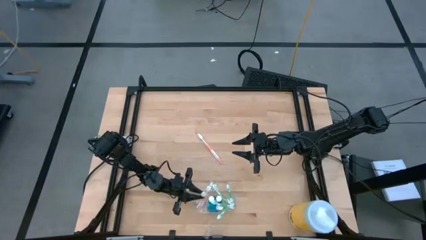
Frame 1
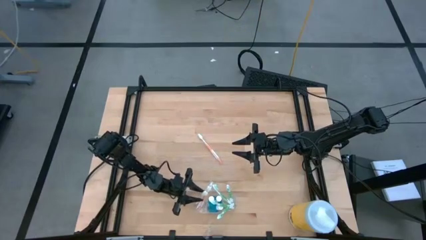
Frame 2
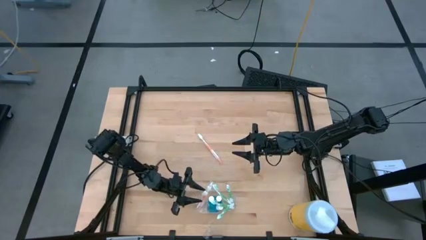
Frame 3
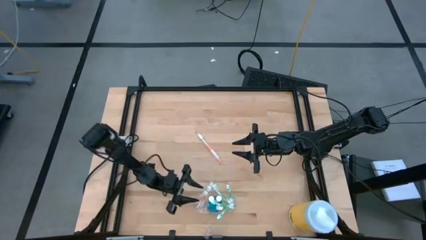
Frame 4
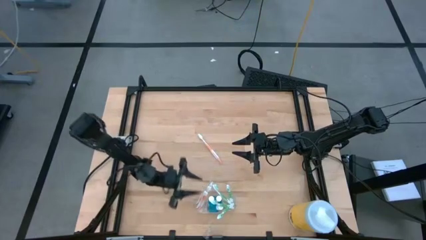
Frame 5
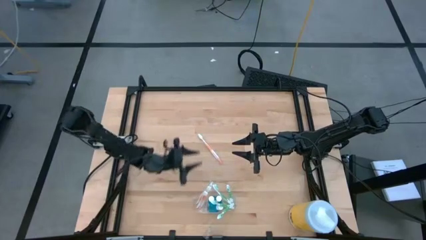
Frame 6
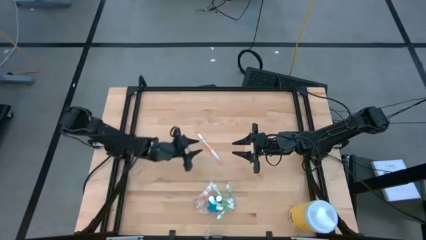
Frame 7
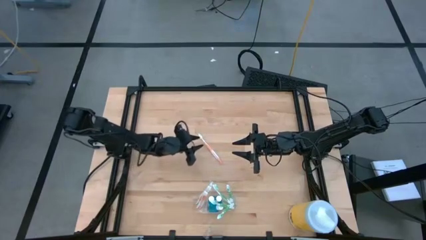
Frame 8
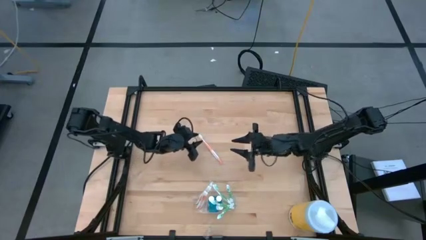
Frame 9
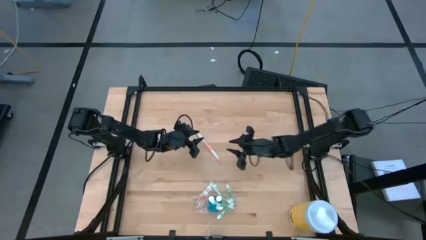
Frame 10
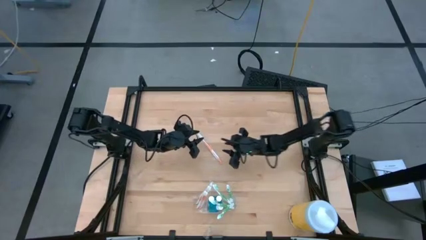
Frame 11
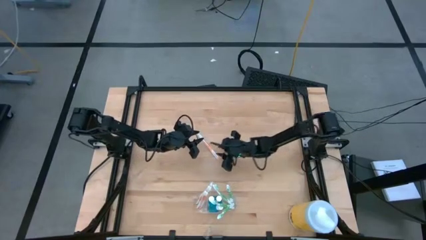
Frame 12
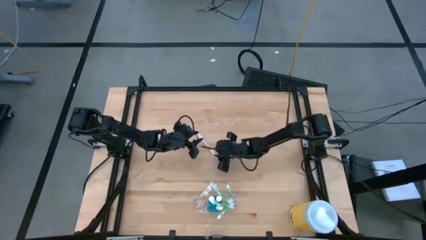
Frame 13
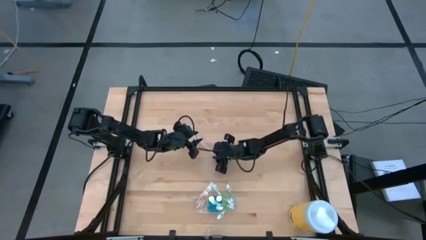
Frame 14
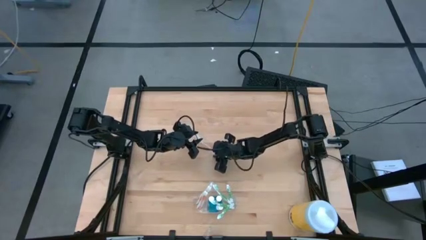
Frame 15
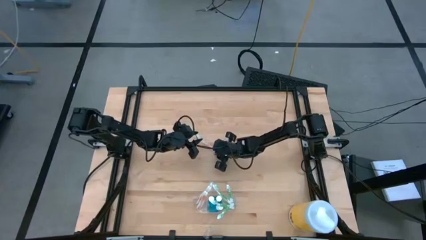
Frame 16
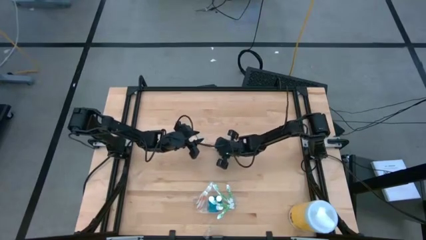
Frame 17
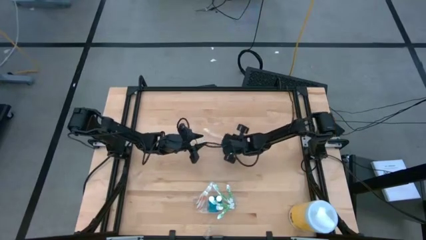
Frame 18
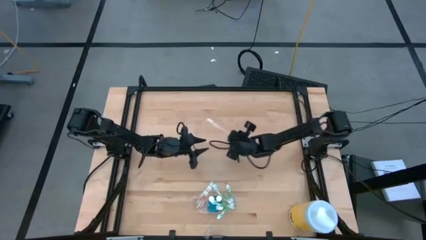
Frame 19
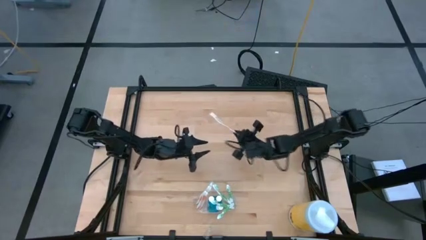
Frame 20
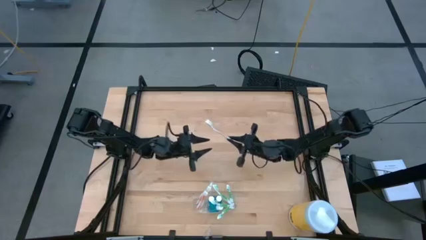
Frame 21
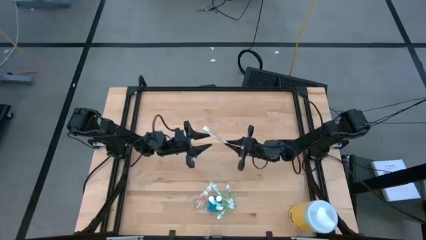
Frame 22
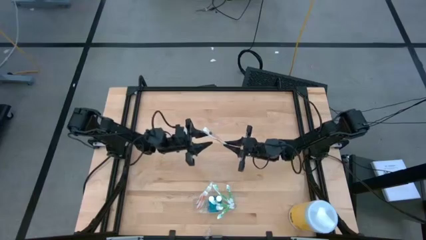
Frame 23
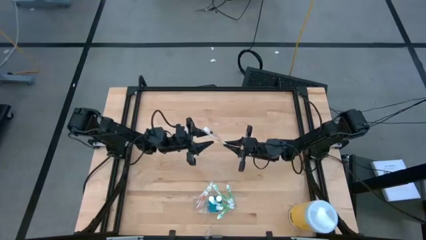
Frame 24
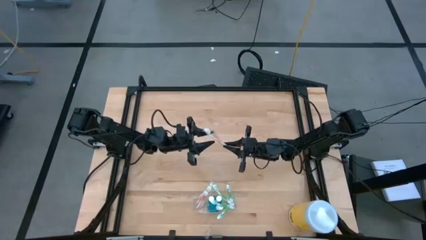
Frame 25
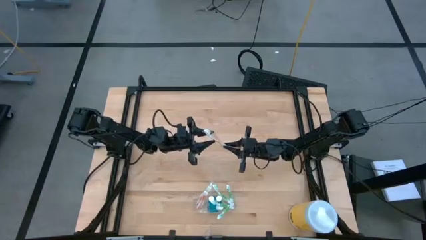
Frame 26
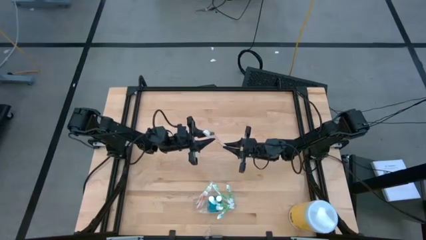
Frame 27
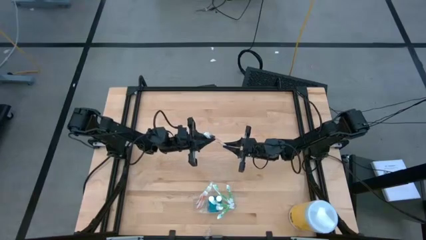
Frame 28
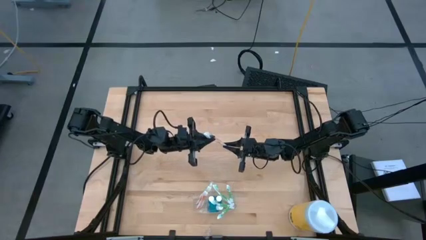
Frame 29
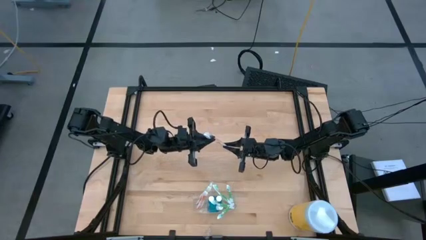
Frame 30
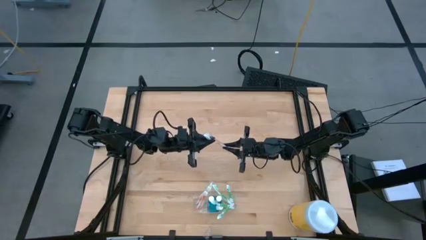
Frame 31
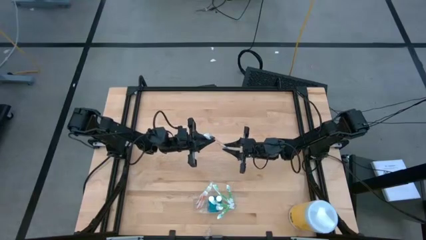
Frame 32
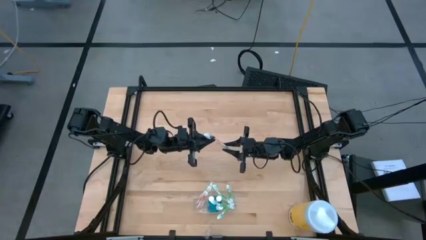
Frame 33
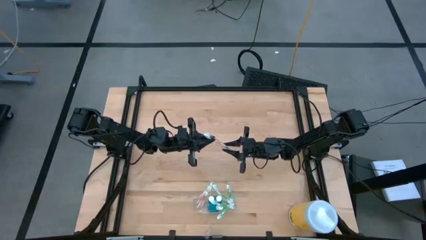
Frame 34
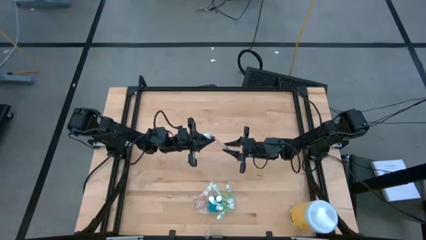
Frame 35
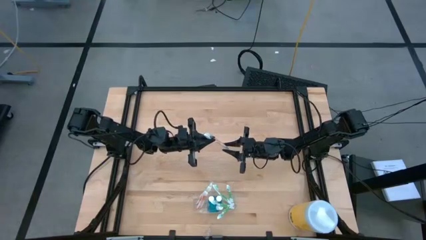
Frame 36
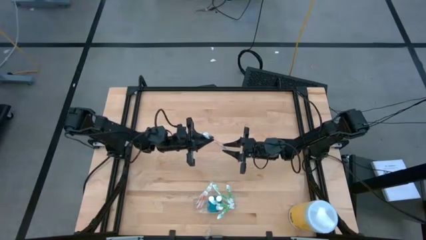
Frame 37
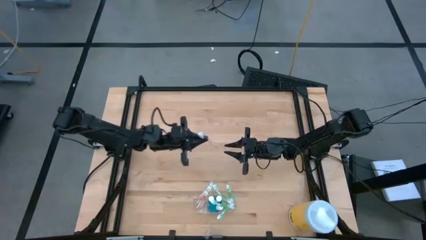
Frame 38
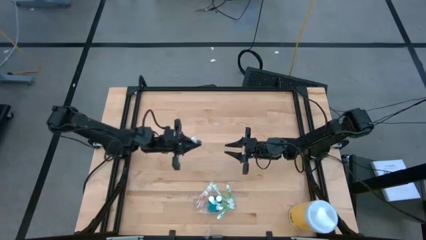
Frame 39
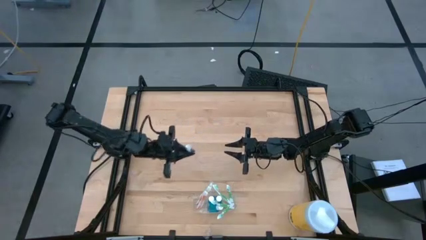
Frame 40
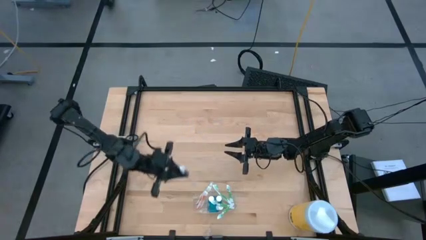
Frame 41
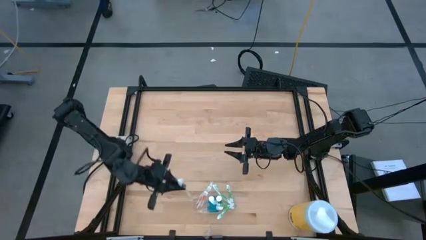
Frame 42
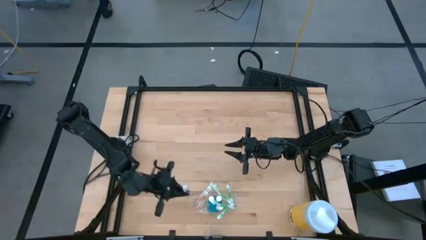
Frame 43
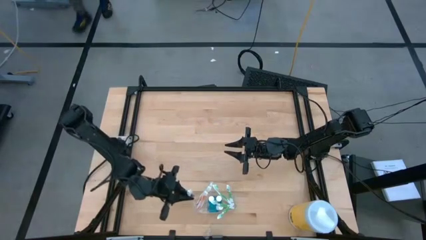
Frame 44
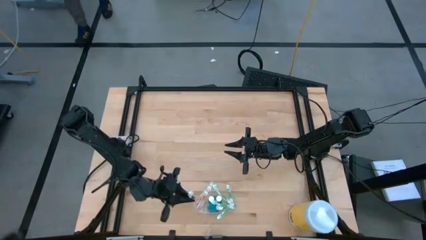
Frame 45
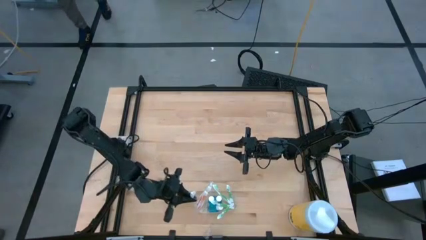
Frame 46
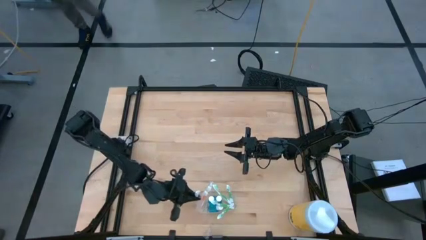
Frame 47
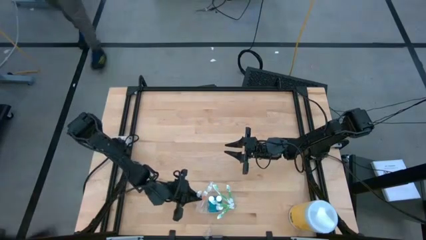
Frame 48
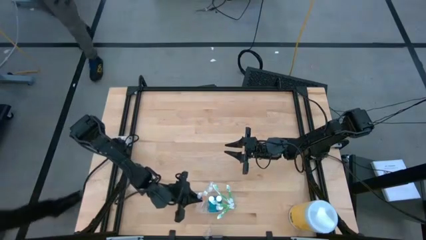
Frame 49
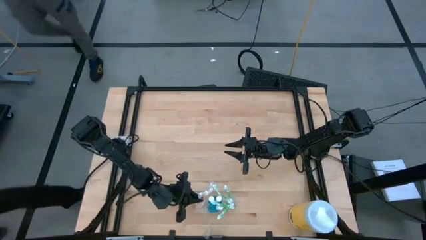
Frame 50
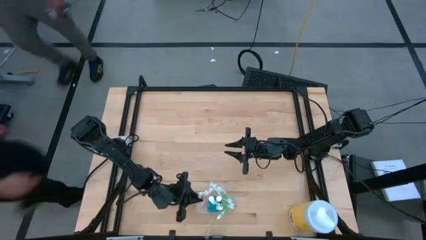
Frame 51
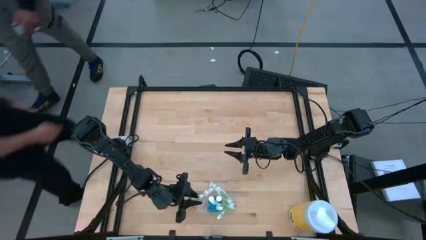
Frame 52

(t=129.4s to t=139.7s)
Task: Pick & Place toothbrushing station
Put the orange toothbrush into the transparent organizer
